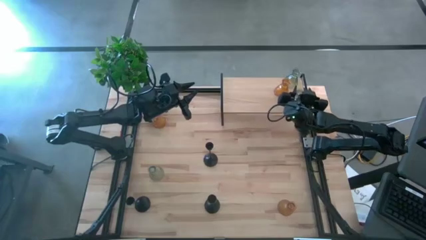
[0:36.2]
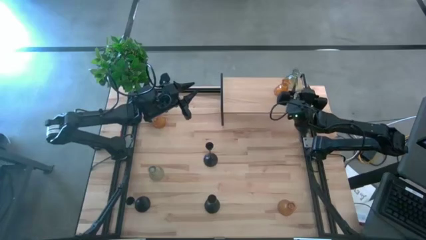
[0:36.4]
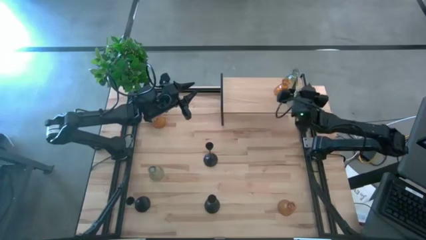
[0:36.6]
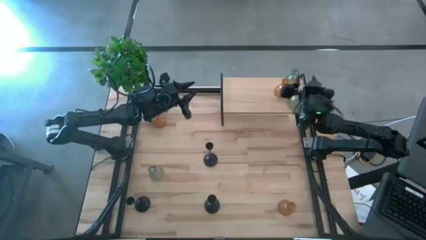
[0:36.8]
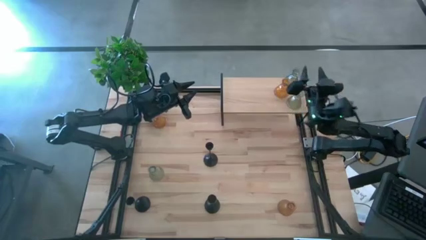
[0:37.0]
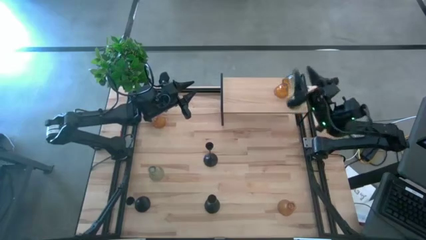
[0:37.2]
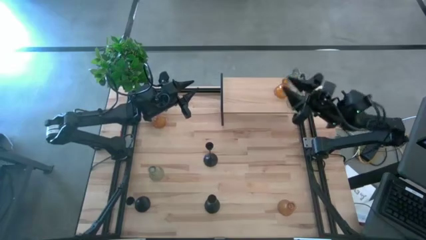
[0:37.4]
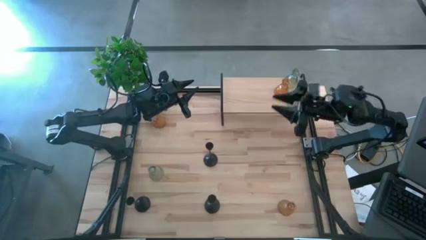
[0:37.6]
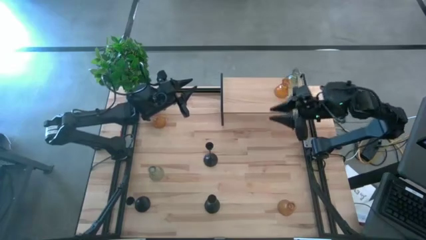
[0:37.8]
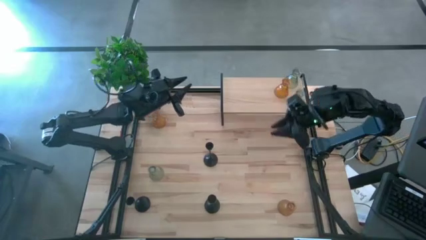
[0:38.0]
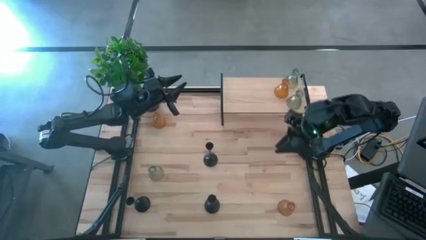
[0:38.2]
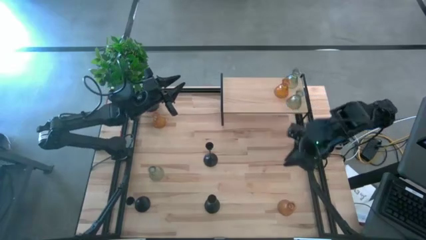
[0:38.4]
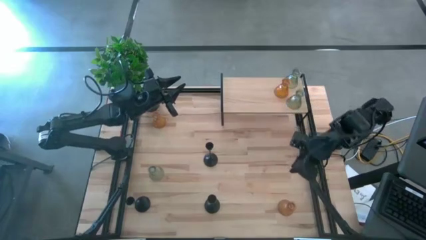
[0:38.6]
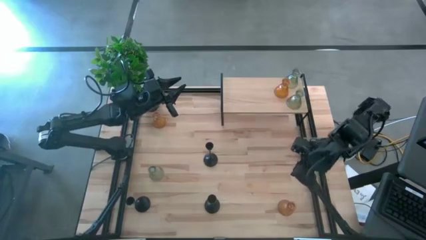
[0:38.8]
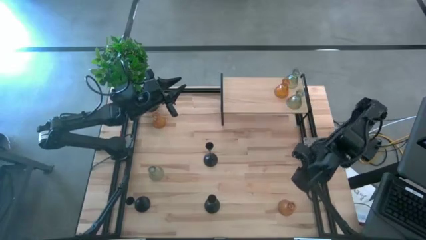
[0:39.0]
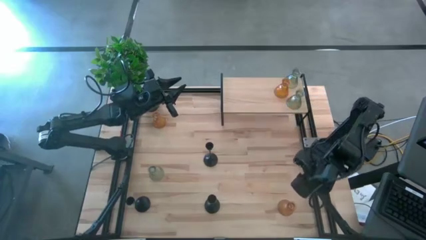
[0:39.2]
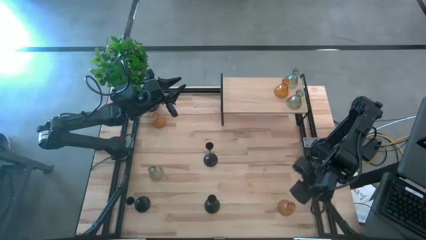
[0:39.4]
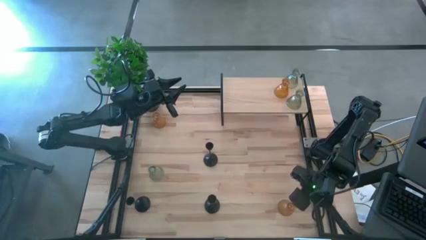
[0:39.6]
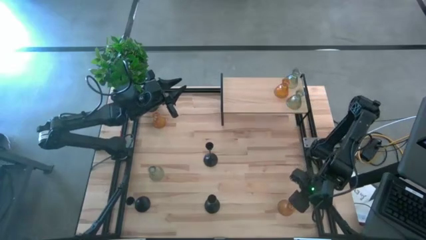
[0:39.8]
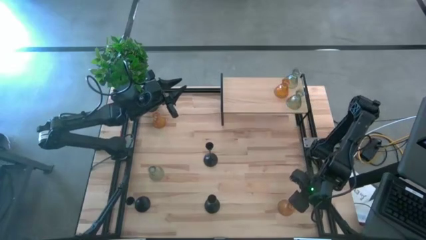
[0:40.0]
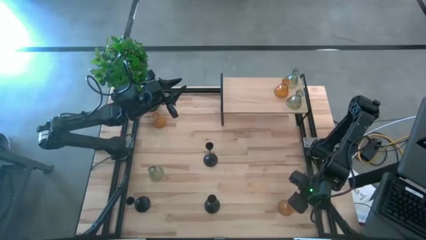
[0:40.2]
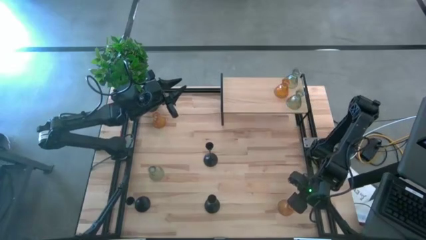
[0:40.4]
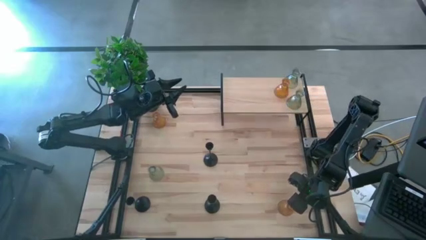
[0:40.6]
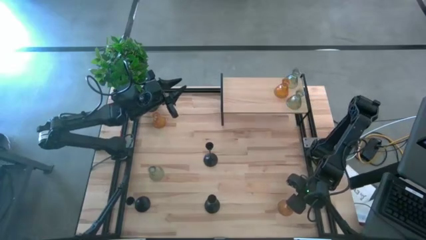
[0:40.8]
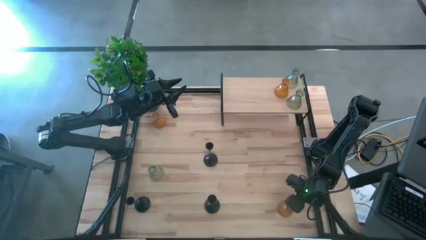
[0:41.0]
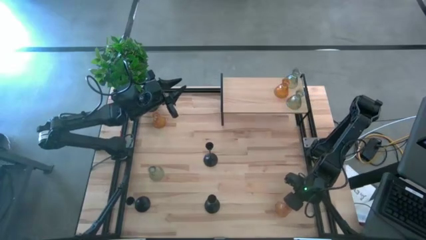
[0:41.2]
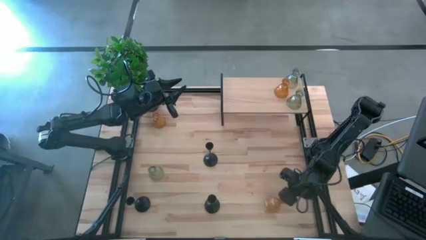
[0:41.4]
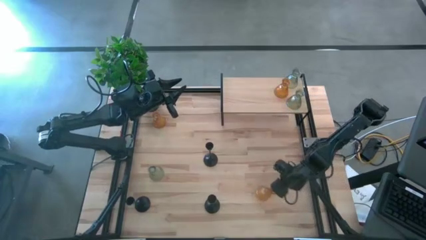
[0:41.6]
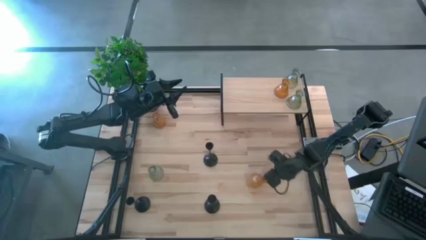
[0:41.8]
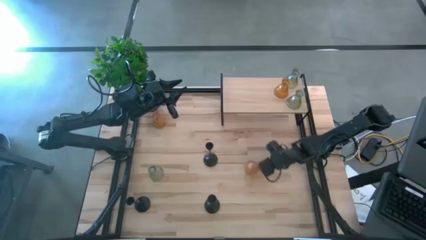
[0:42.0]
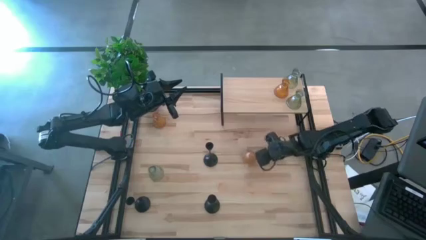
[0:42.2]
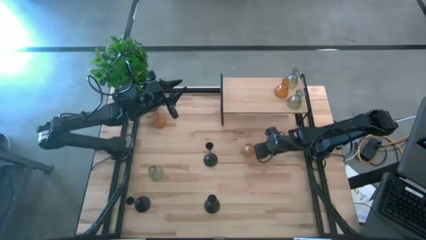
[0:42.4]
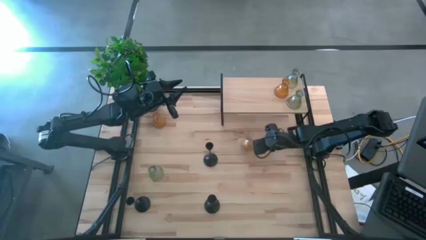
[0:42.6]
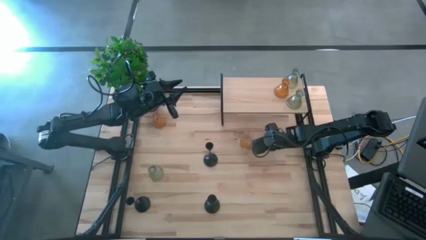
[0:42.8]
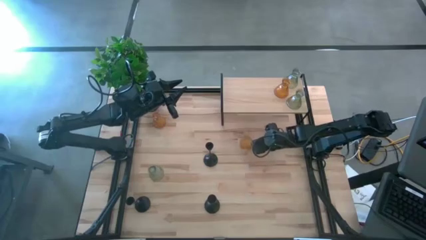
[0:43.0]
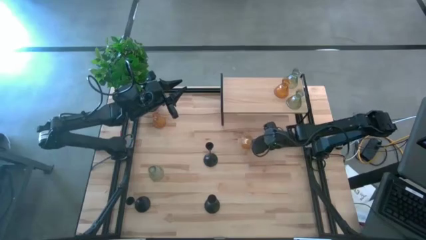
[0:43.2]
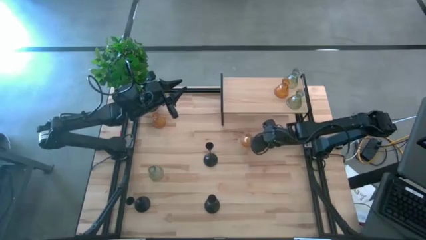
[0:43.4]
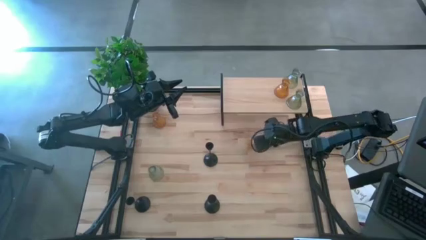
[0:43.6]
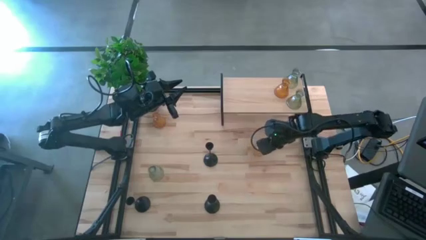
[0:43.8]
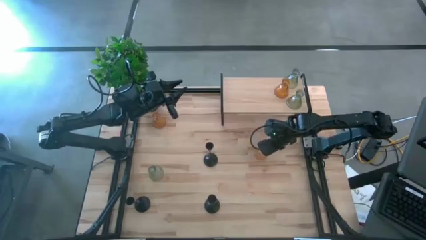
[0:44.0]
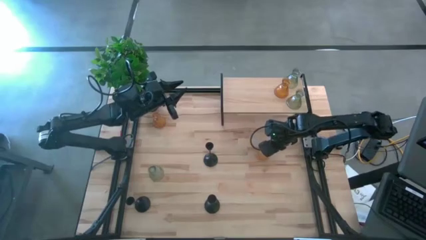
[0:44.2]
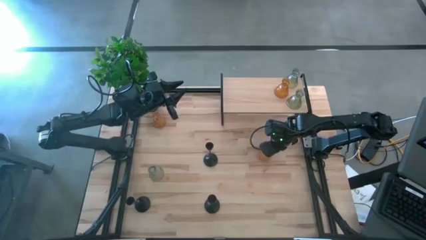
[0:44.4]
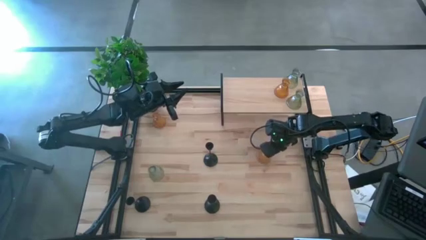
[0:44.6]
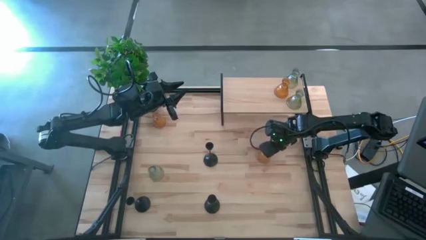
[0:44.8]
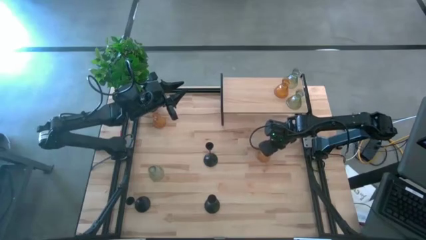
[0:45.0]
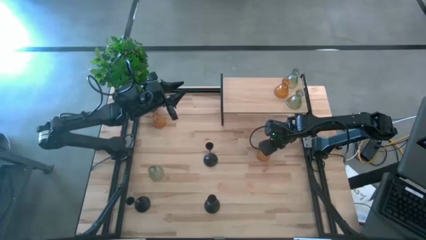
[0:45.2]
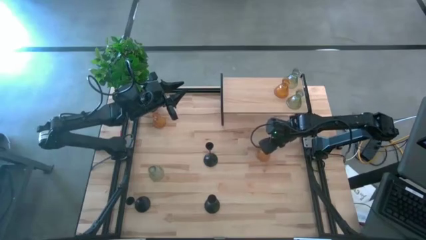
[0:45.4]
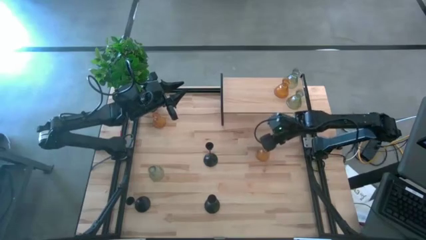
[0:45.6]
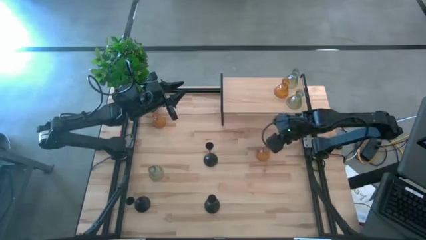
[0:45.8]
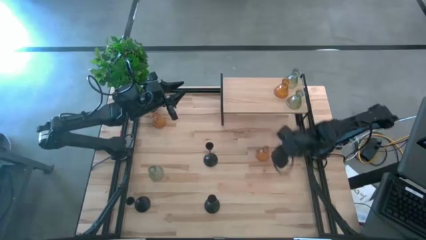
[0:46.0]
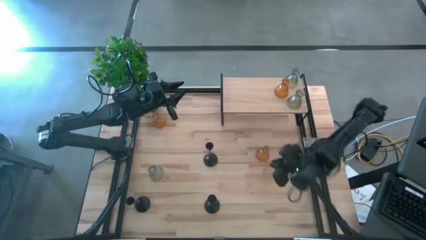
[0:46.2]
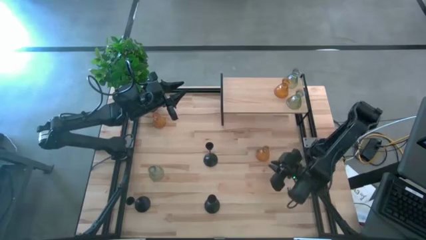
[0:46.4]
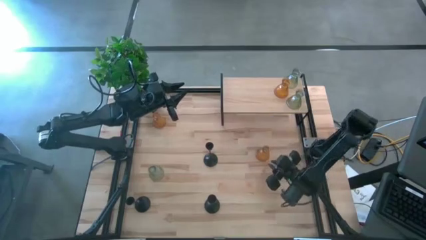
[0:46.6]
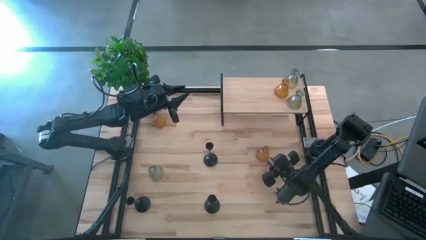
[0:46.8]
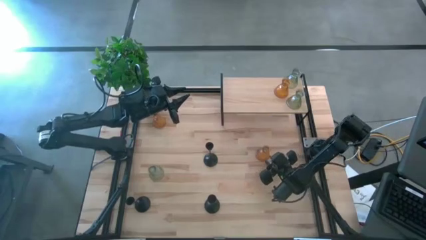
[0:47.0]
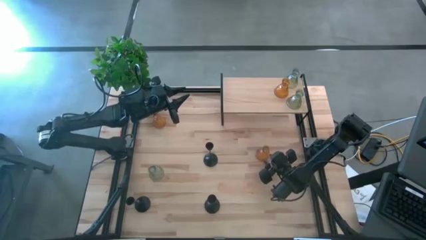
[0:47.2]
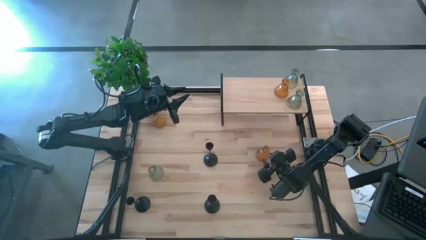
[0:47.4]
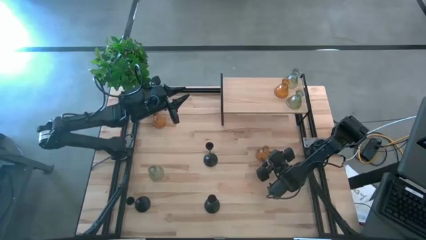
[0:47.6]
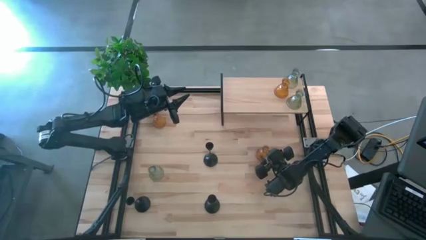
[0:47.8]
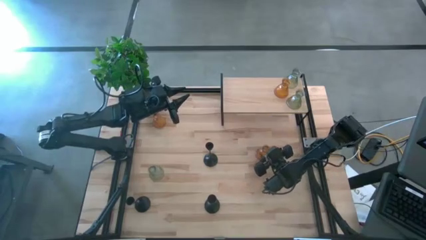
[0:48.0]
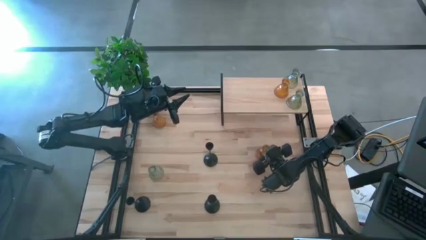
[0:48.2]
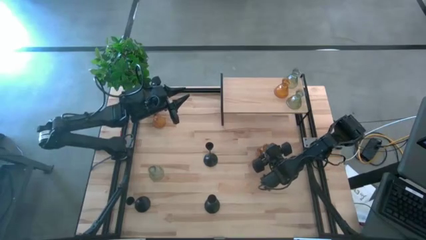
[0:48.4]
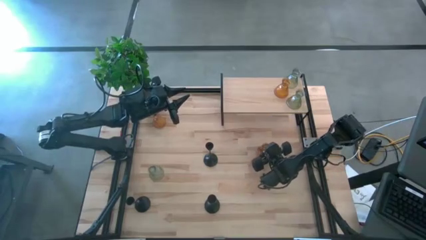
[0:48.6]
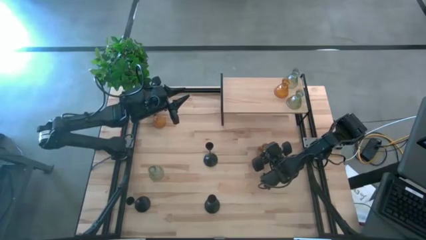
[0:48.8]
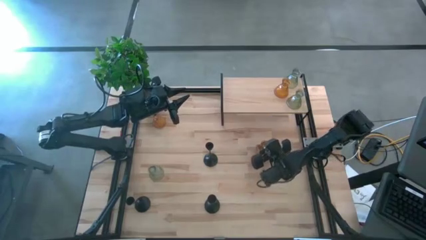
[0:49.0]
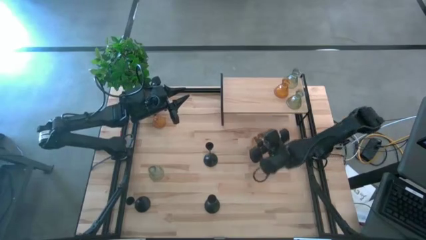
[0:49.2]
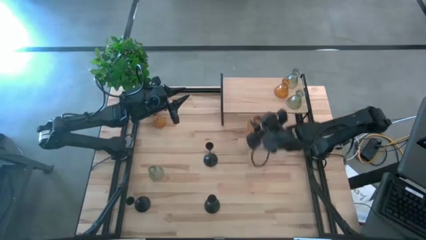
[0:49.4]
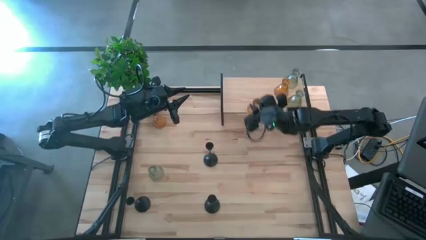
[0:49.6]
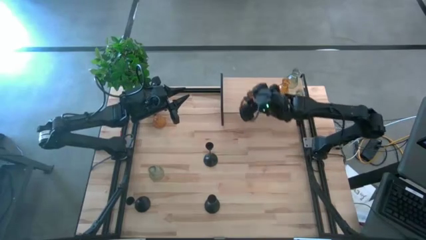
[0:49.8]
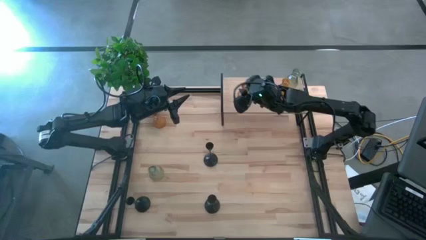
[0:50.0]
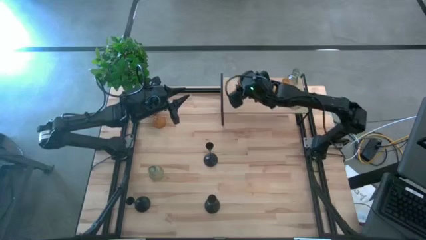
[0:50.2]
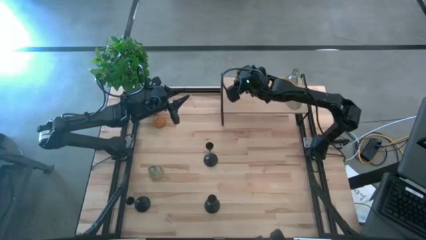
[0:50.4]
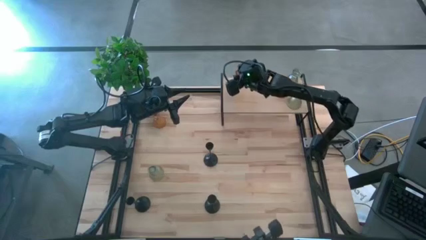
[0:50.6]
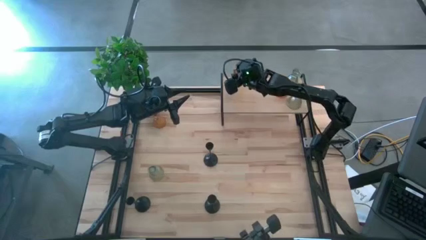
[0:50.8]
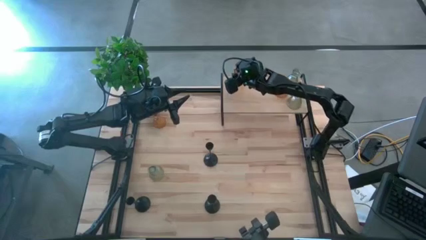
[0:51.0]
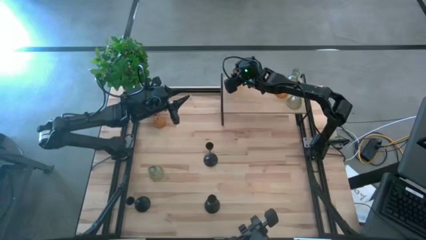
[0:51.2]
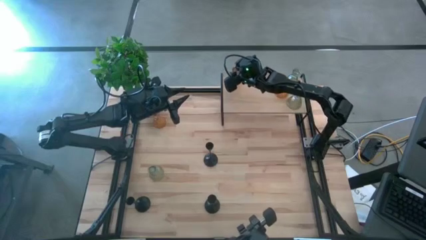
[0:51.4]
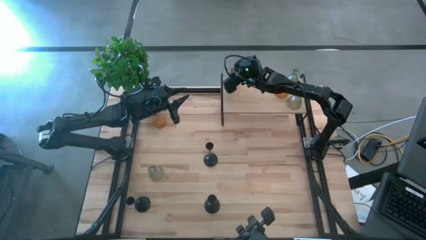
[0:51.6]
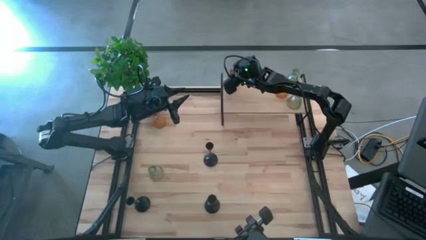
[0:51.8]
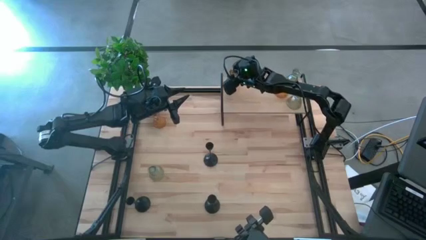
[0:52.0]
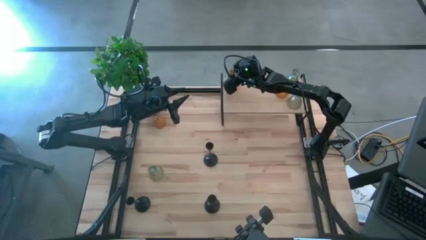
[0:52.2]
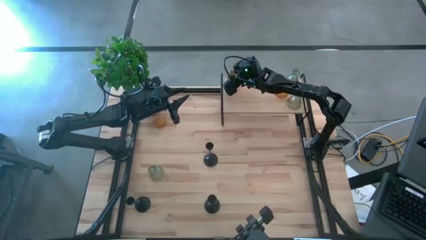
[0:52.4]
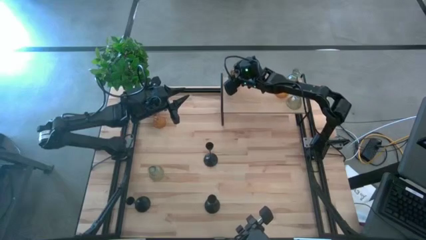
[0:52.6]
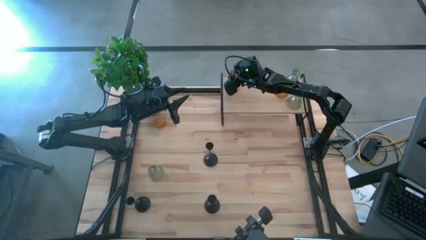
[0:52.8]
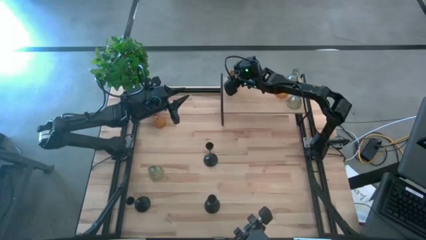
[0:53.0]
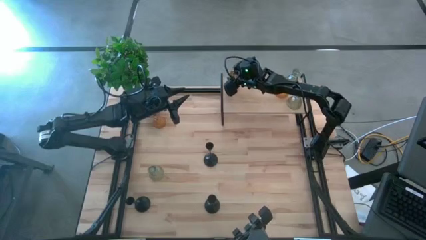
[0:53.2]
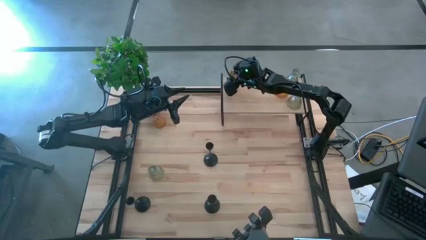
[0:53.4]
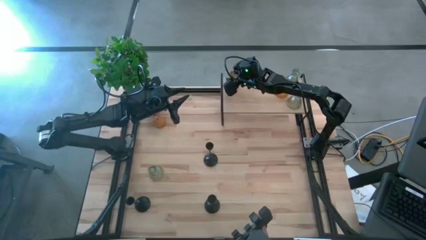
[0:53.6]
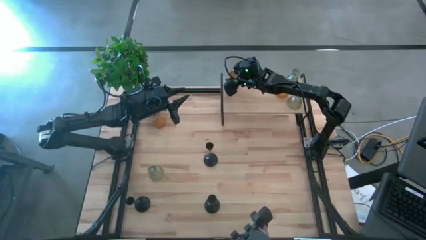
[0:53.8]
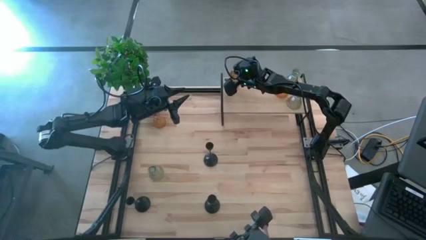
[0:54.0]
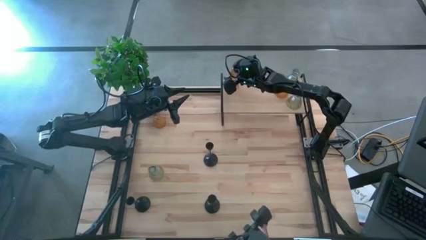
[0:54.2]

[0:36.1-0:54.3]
Task: Pick & Place candle stick holders
Put the bottom orange glass candle holder on the shelf
